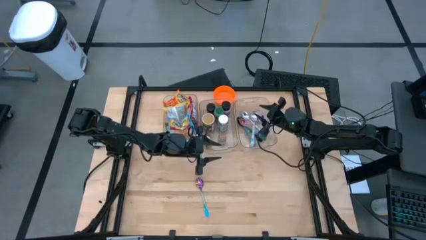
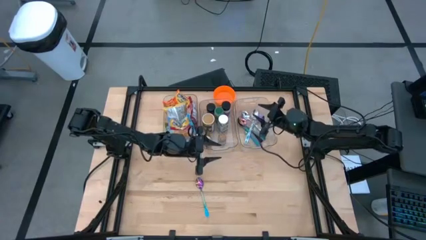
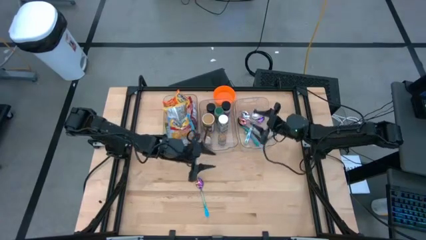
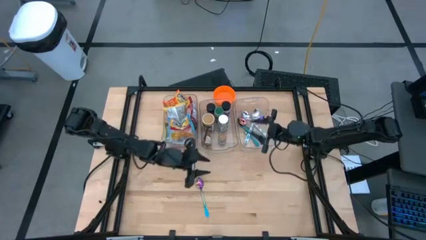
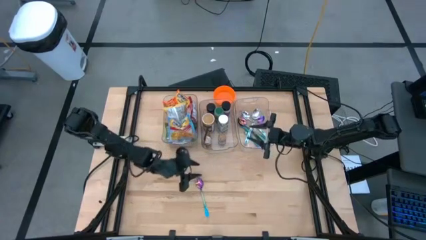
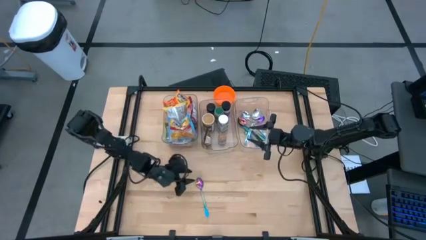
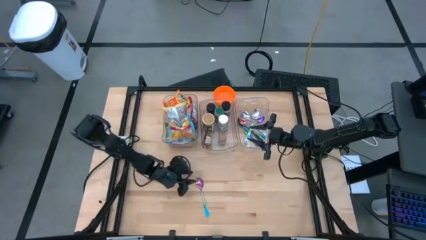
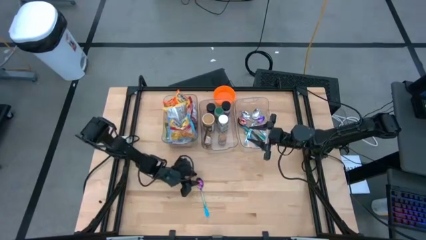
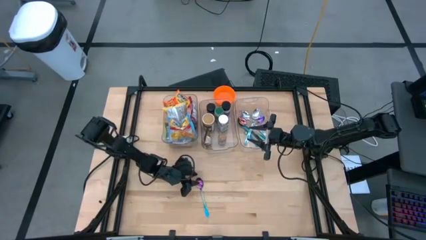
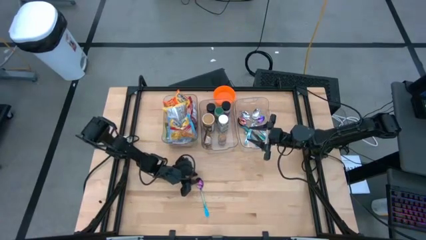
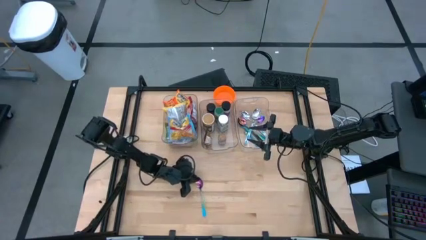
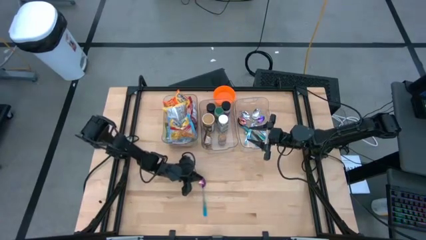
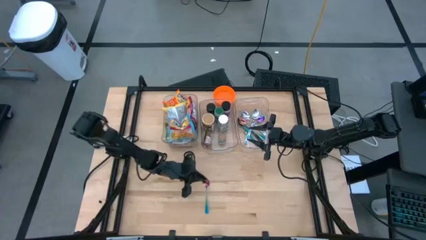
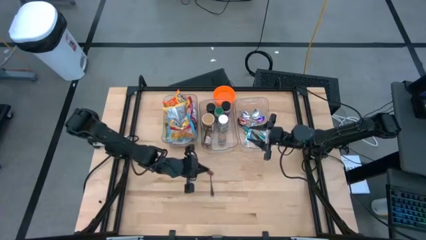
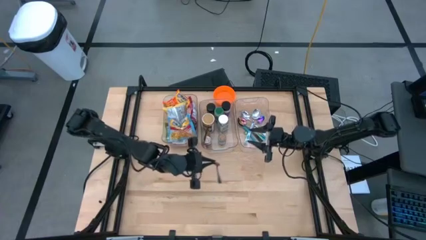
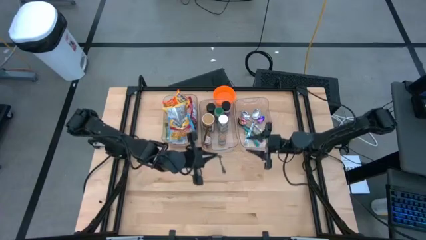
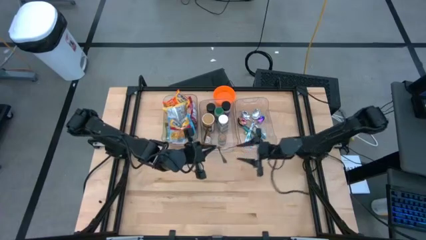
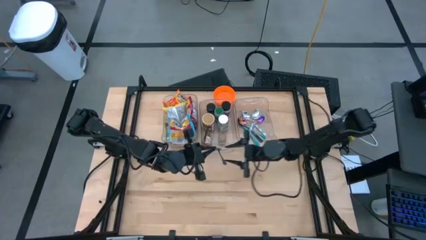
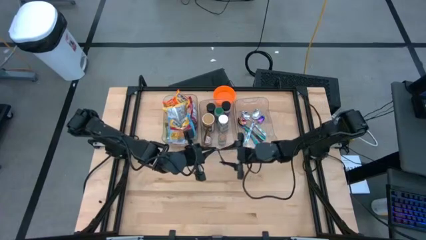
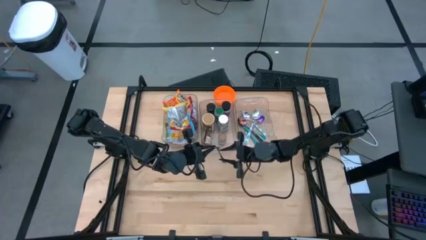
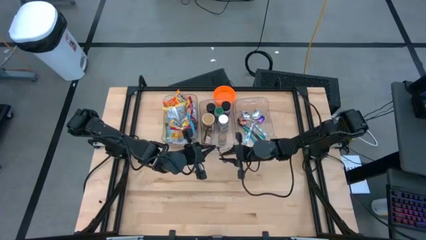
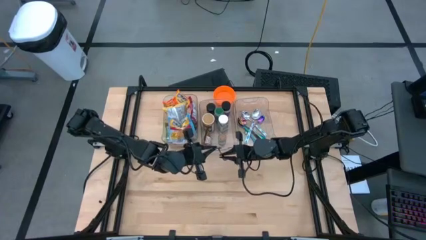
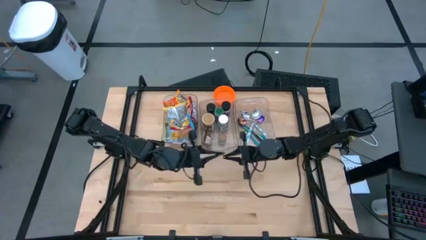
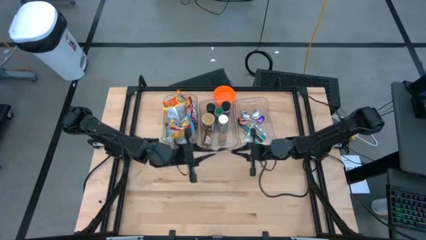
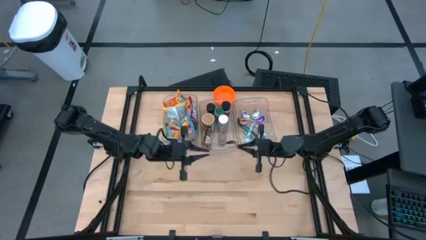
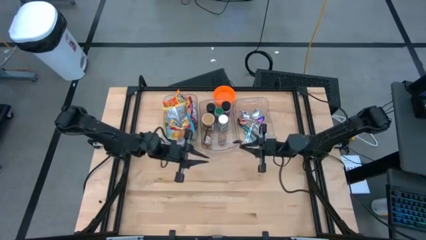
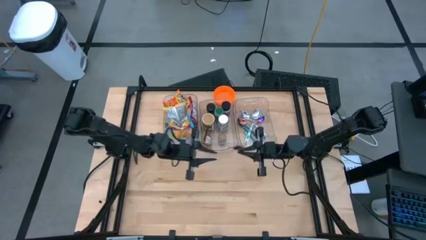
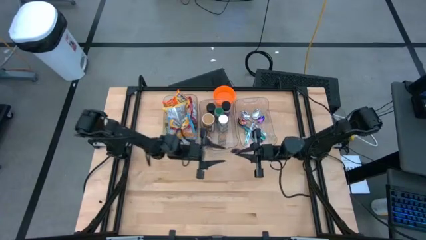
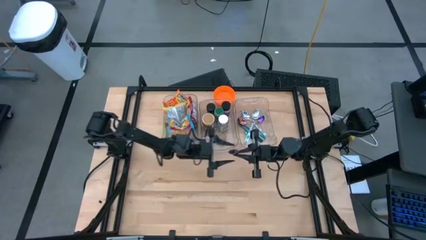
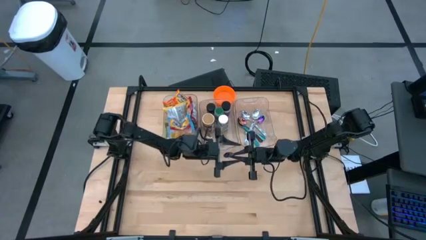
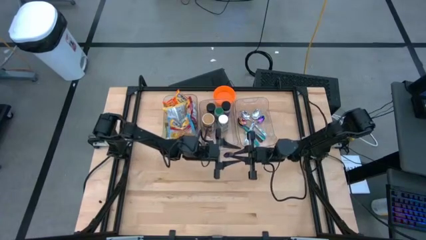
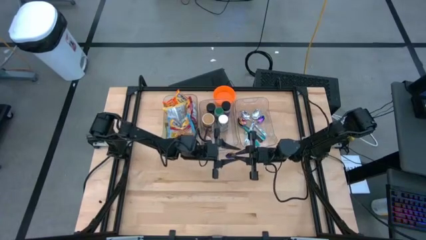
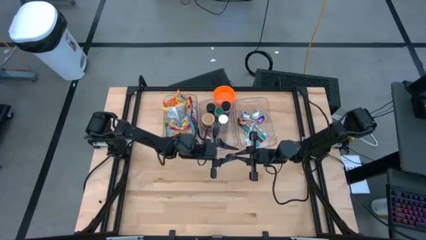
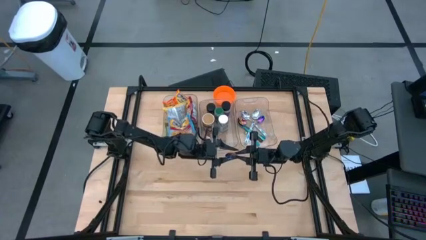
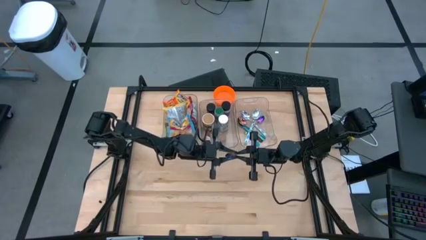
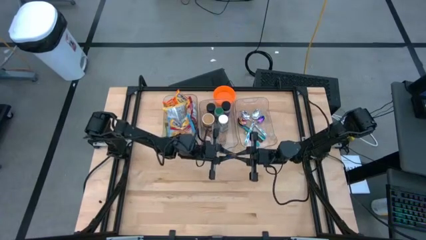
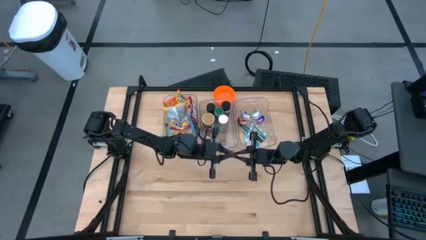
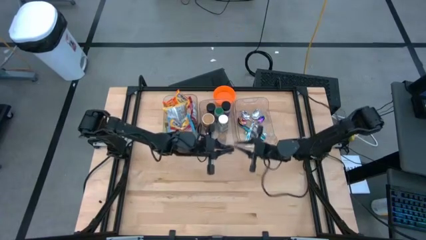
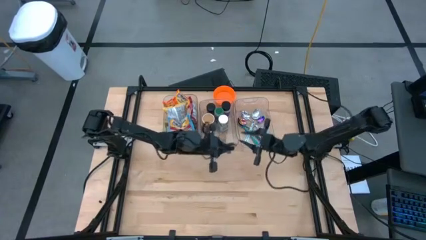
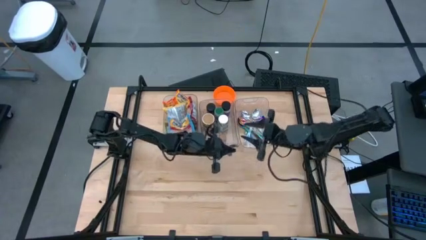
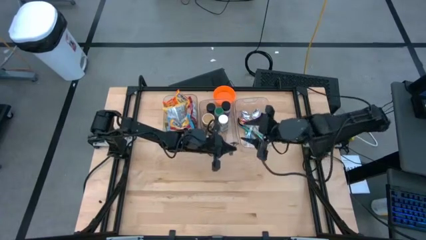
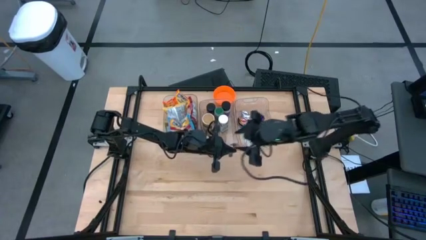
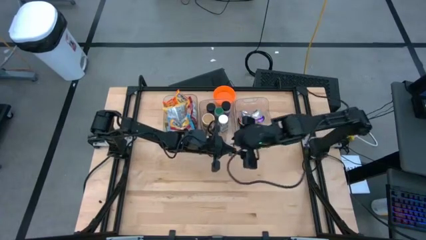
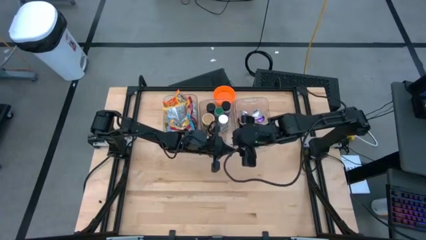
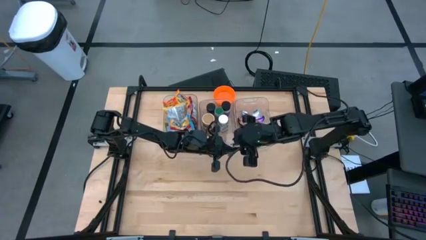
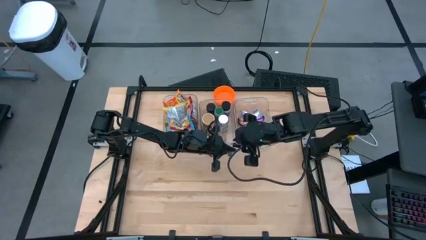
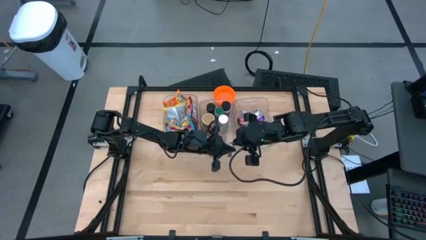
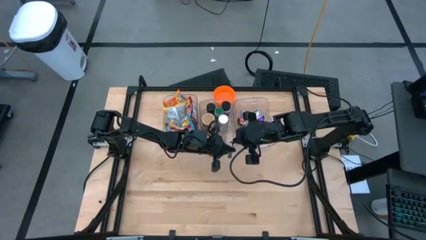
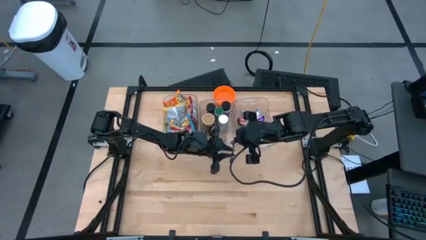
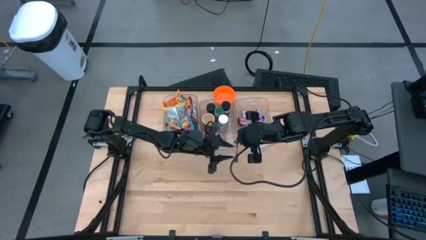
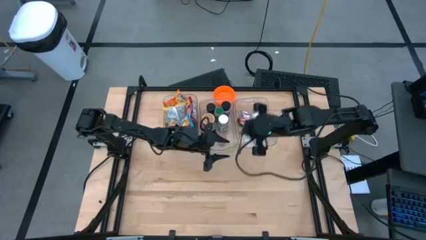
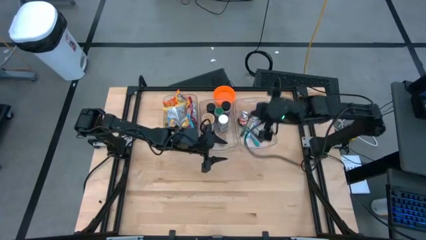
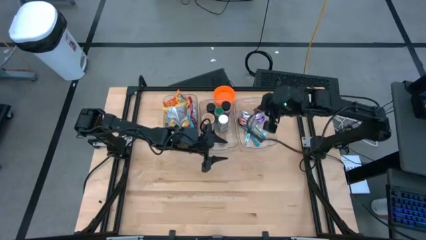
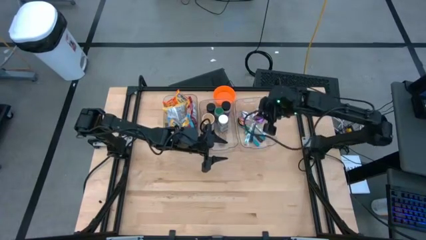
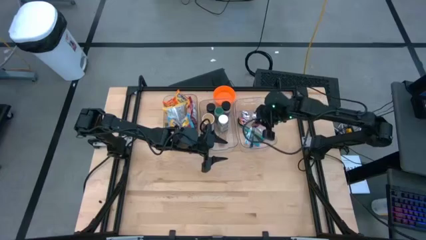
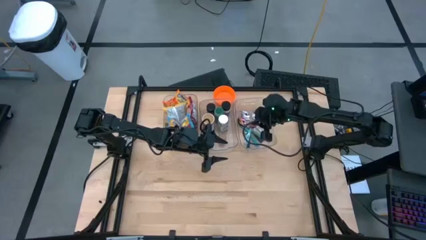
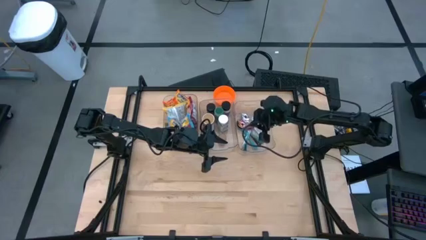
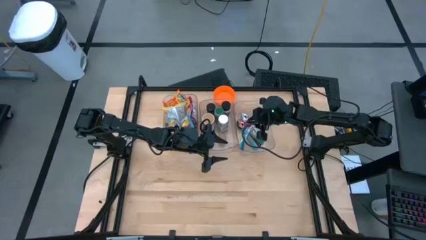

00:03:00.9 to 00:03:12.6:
Task: Pick & Place Food Item
Put the purple spoon into the right transparent bin

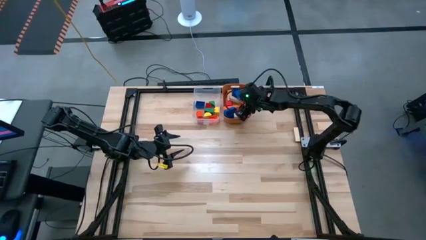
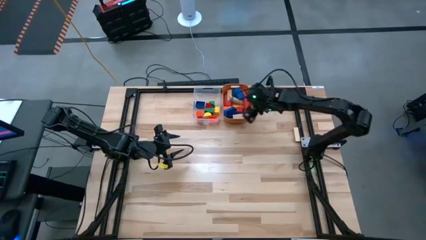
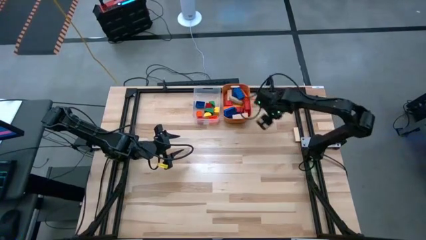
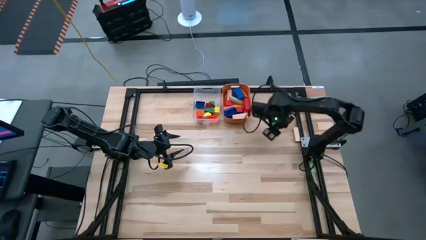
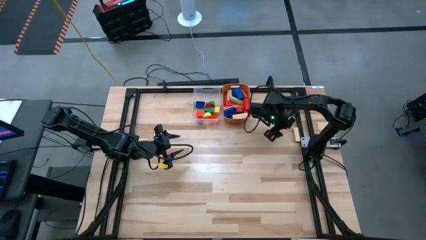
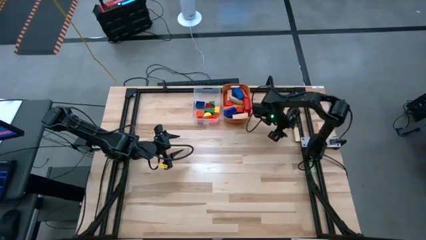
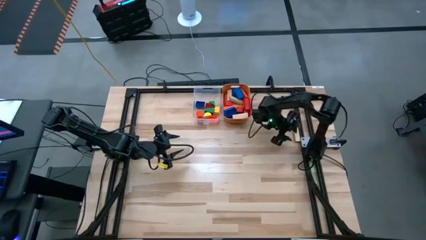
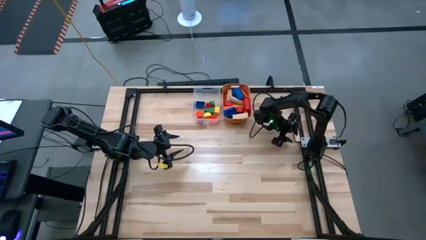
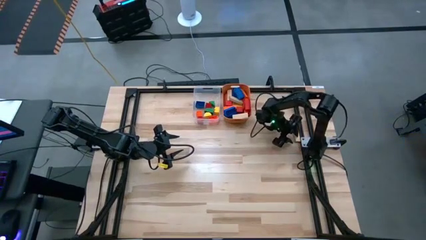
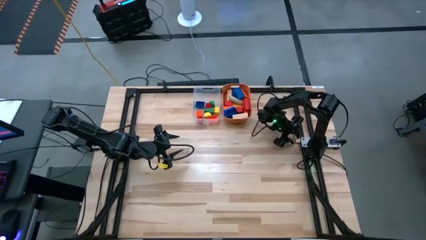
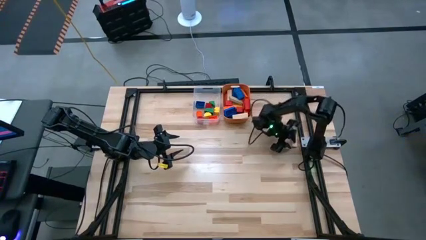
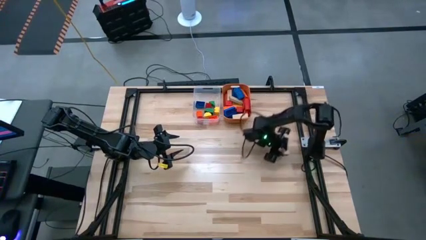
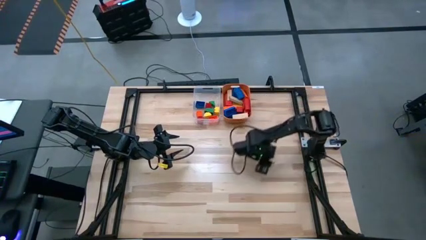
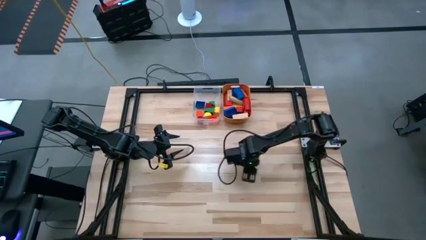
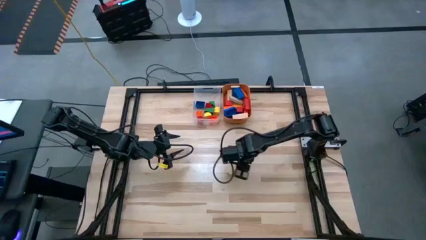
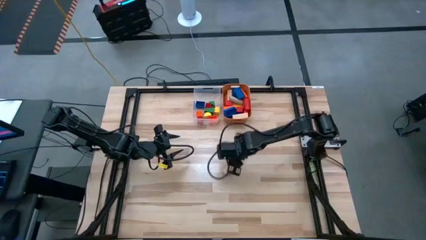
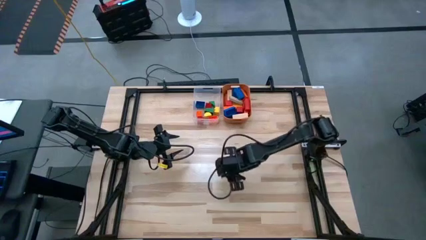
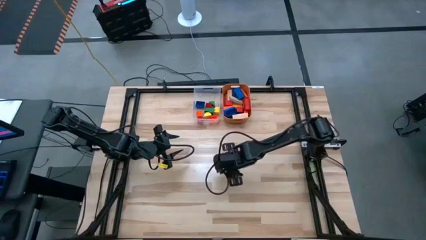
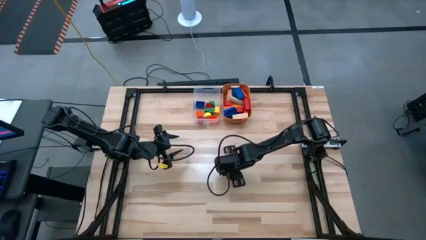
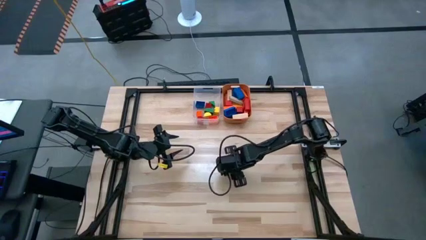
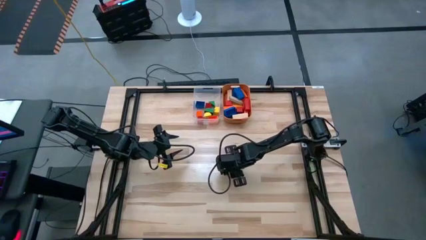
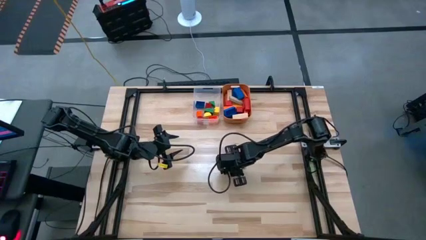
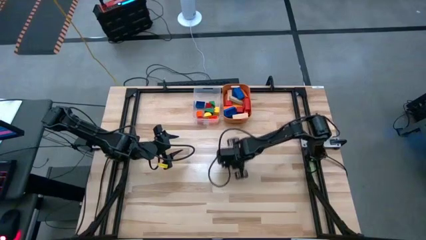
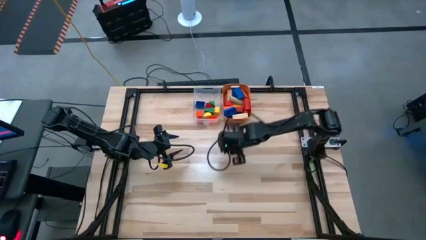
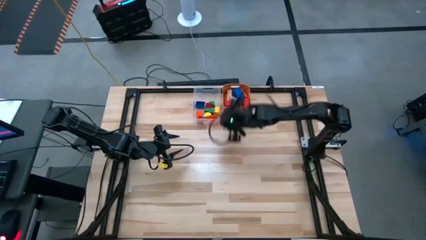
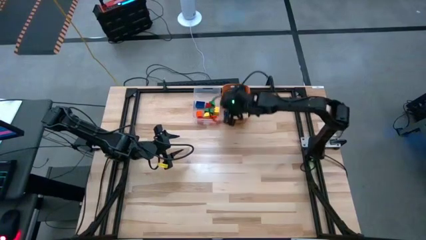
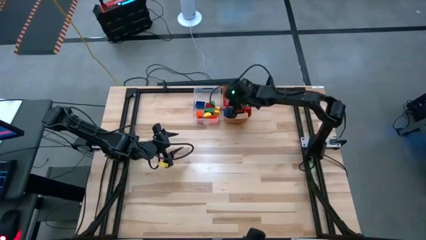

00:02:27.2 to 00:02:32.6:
Task: Sort blocks by size
Put the wood rectangle block into the orange bin
